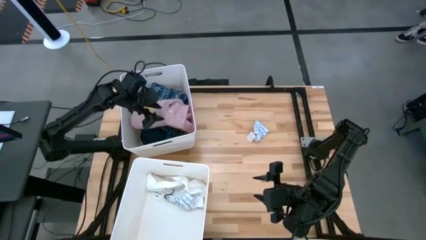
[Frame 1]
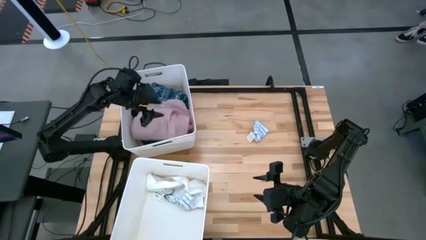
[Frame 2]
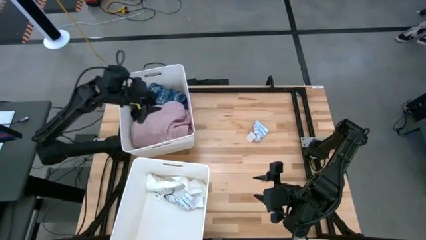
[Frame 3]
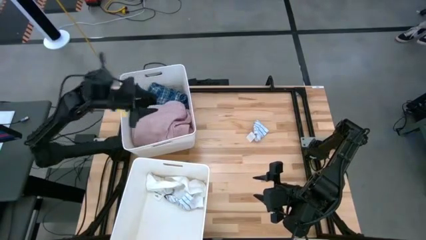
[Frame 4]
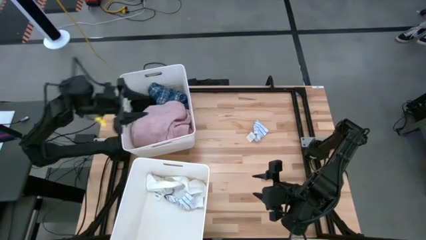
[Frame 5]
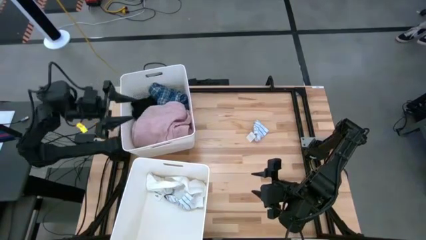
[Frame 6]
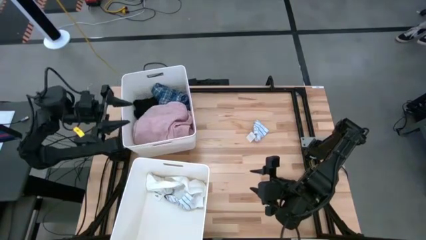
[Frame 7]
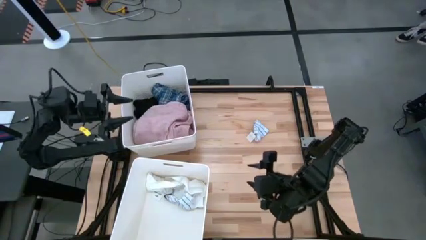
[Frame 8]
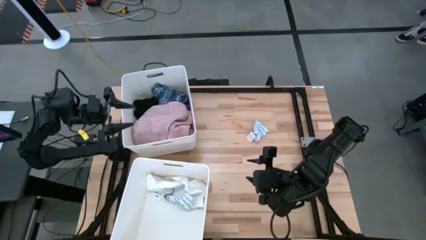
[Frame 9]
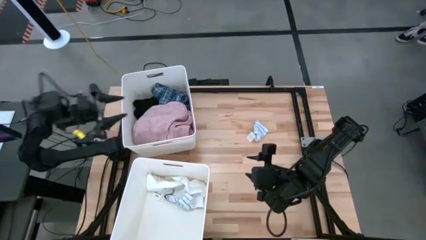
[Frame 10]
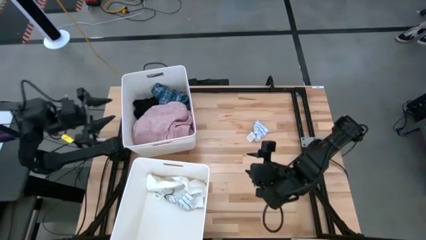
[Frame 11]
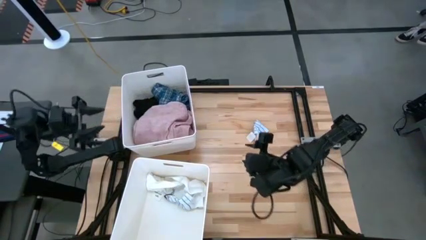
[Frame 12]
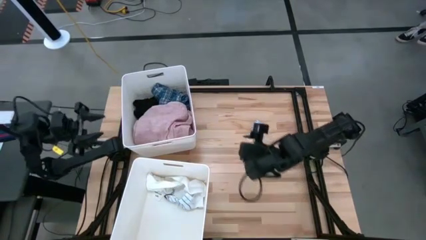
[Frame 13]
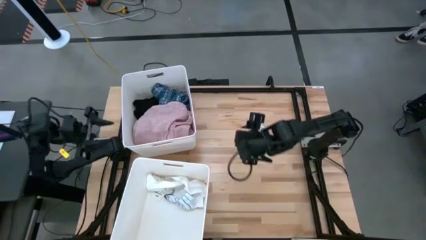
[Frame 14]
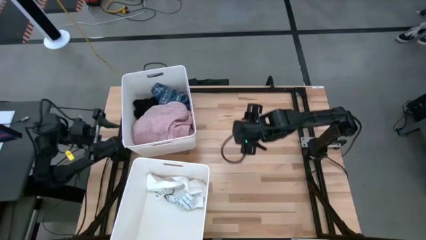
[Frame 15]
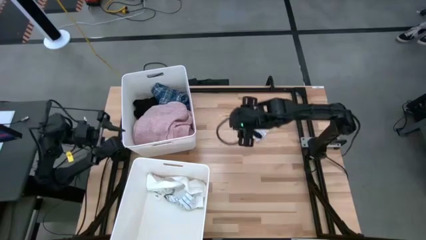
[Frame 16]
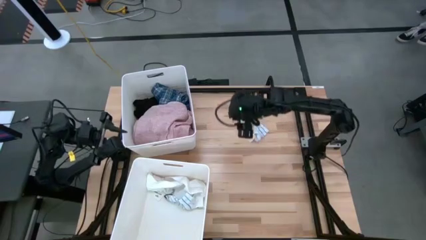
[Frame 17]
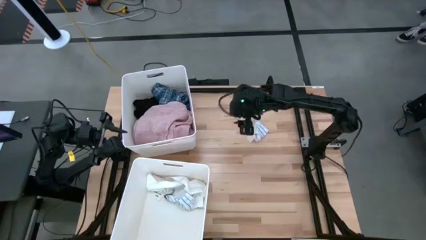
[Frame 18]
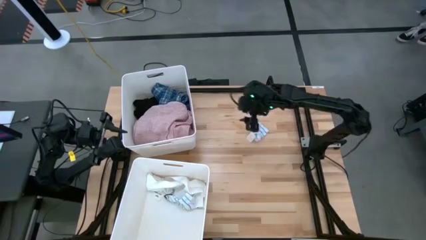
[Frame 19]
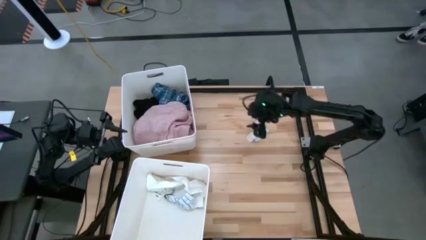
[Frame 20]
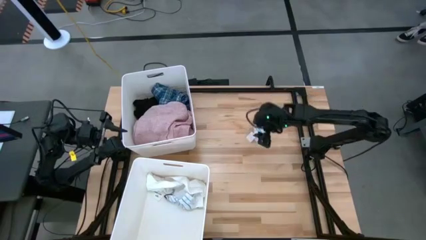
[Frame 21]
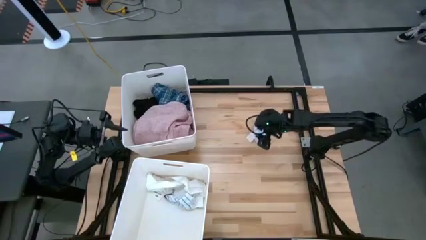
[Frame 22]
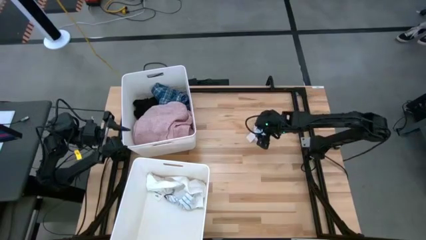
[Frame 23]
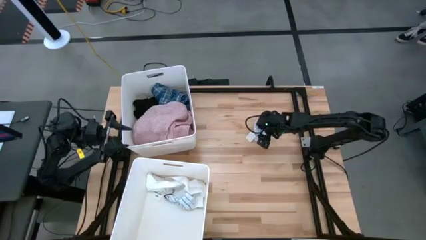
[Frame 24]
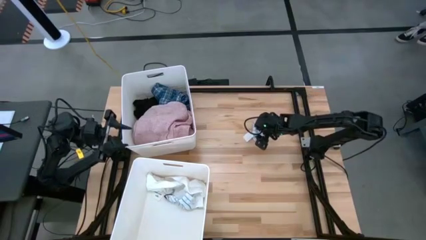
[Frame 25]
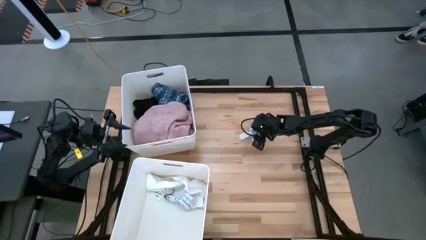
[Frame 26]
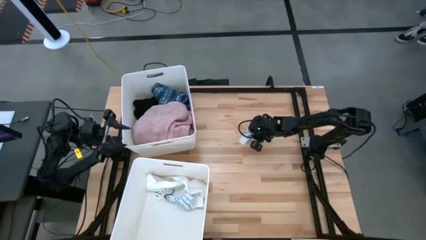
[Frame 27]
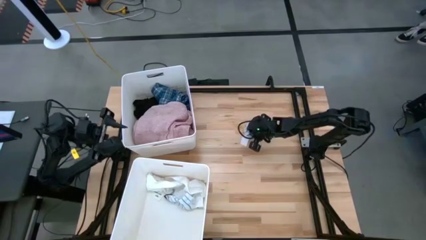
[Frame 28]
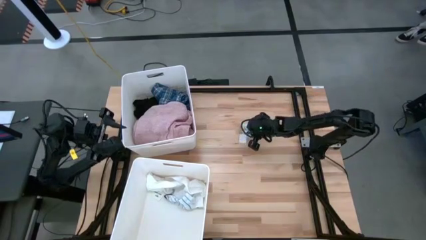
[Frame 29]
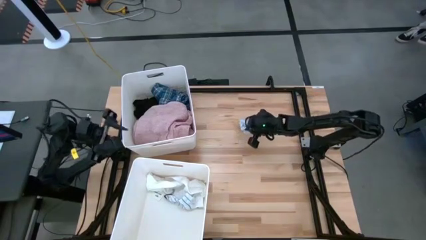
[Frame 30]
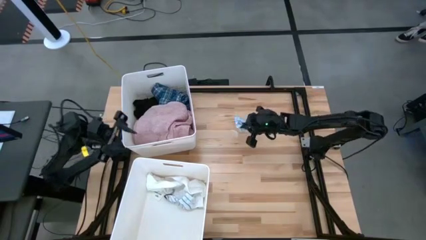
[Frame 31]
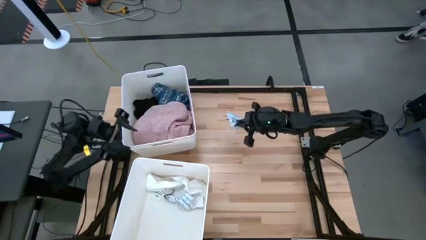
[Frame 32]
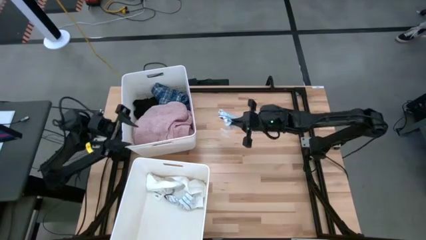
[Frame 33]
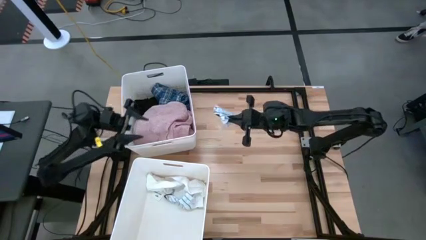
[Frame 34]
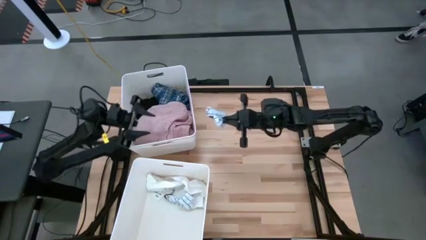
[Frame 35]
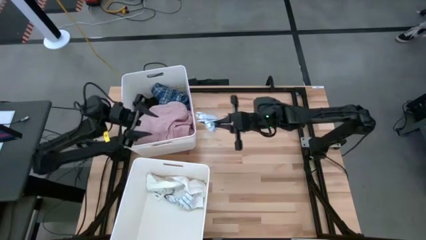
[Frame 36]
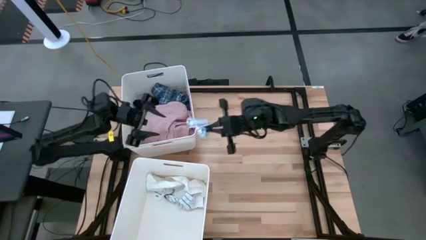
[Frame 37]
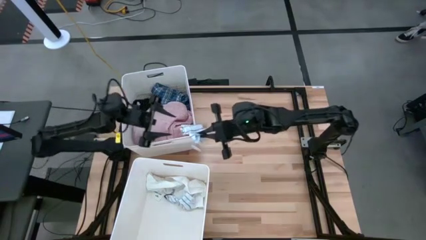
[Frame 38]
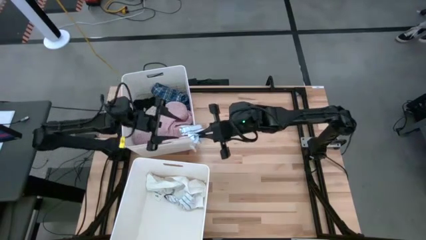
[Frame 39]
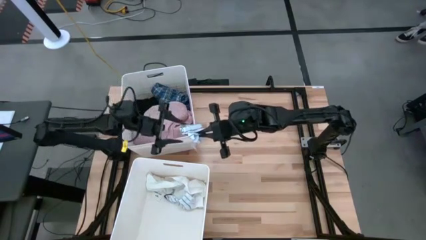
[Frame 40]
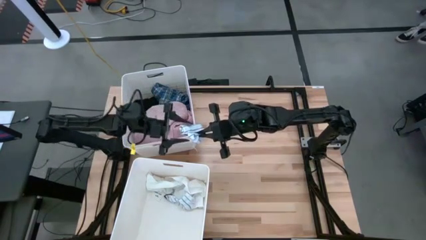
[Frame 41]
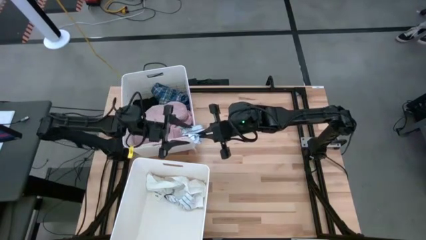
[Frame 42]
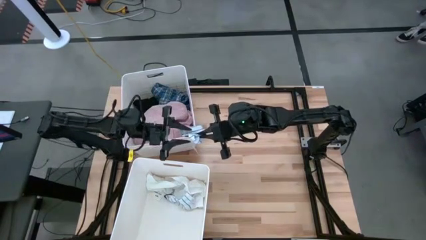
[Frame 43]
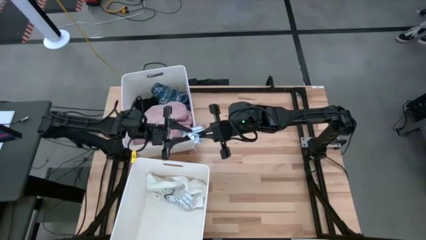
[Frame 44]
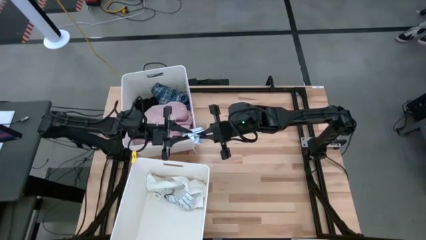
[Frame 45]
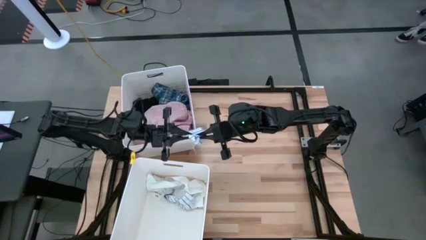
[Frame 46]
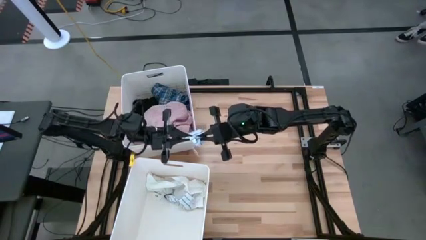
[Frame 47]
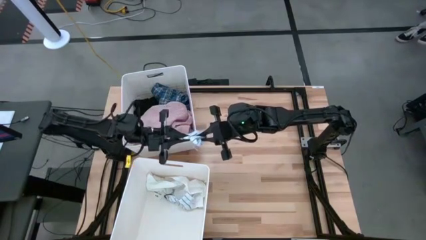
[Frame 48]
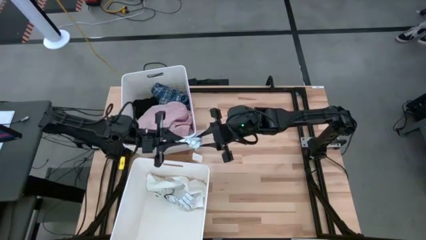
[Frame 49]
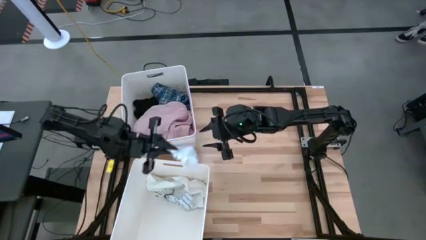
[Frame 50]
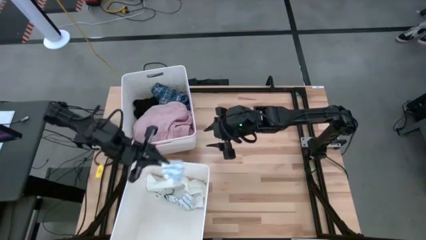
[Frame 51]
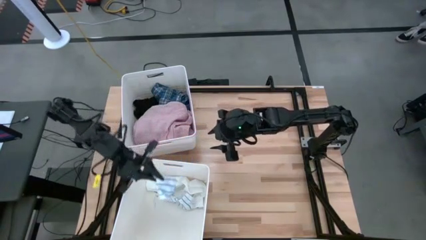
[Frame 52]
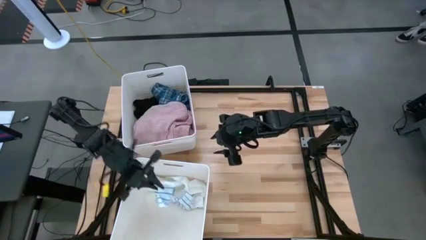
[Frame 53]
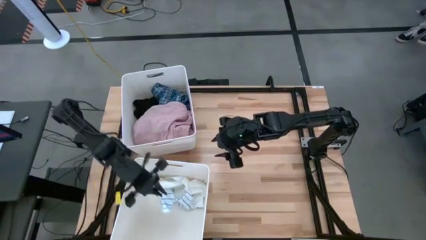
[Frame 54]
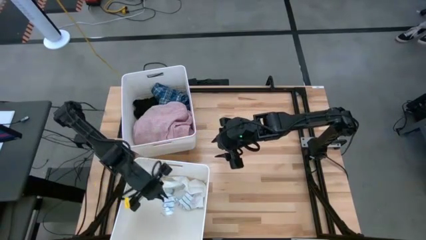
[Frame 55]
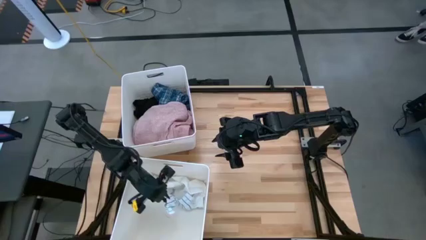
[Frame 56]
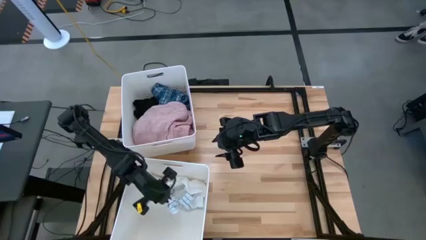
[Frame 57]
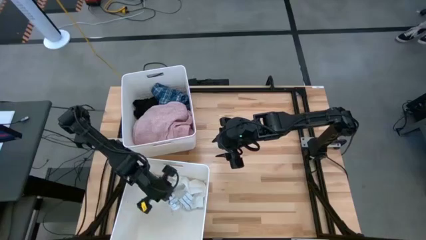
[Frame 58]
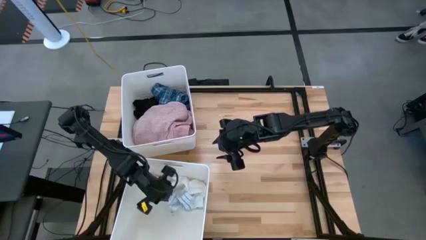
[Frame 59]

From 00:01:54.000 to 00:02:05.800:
Task: Sort clothes
Put the white striped sock into the bottom white laundry organizer

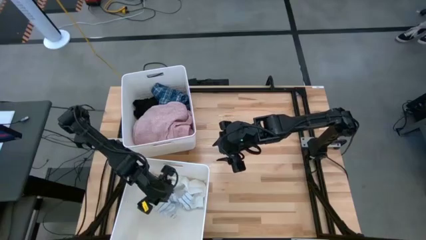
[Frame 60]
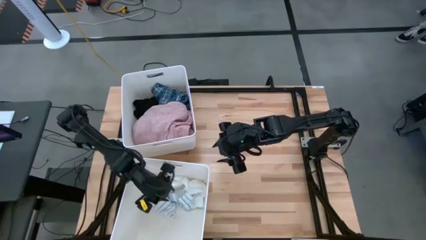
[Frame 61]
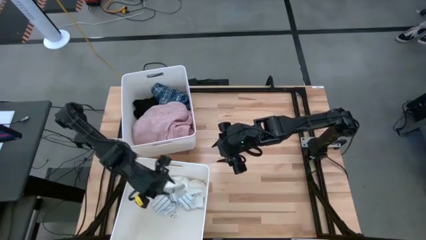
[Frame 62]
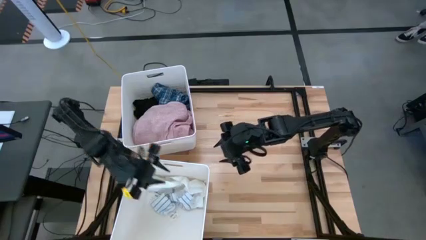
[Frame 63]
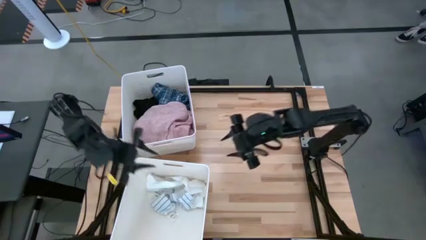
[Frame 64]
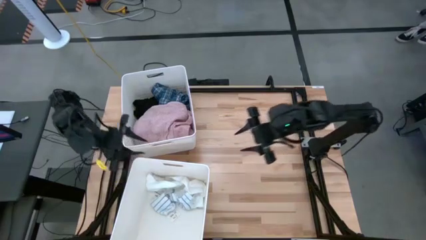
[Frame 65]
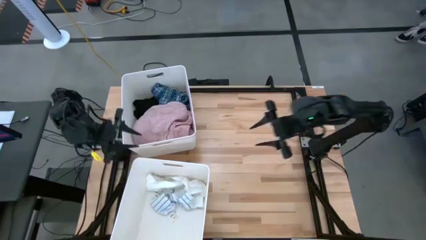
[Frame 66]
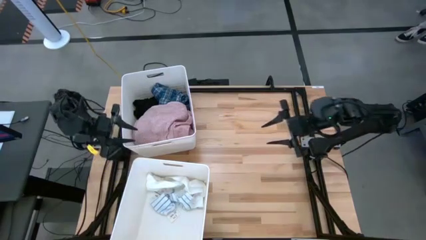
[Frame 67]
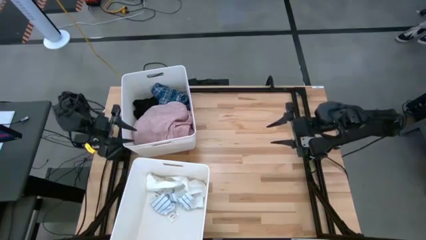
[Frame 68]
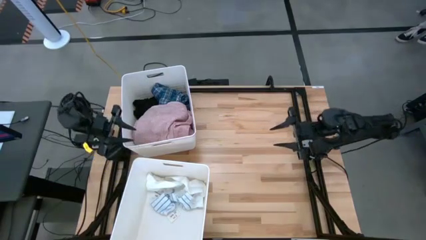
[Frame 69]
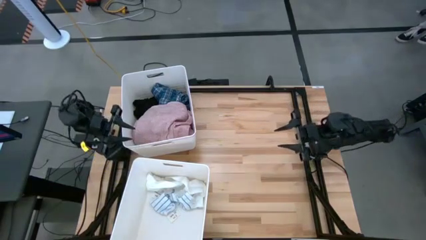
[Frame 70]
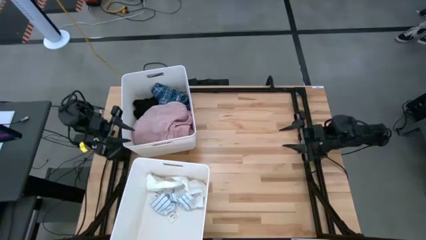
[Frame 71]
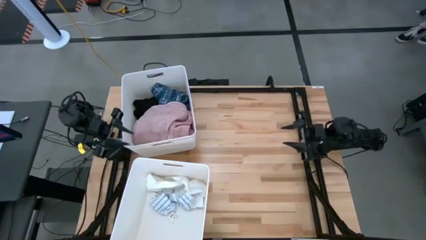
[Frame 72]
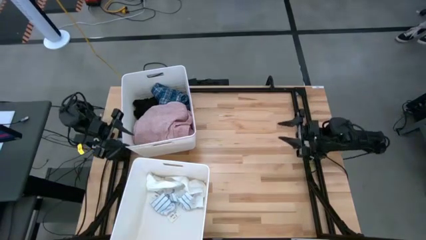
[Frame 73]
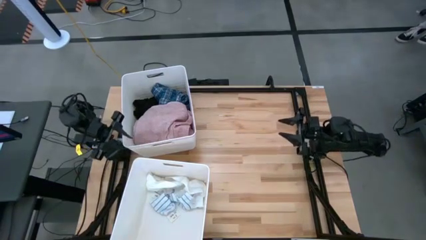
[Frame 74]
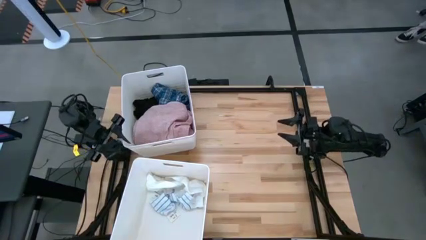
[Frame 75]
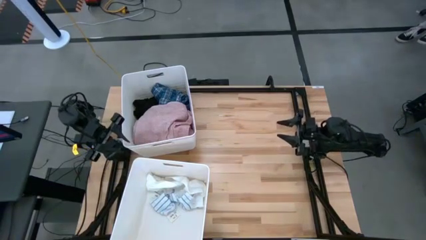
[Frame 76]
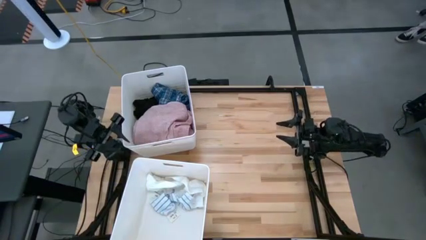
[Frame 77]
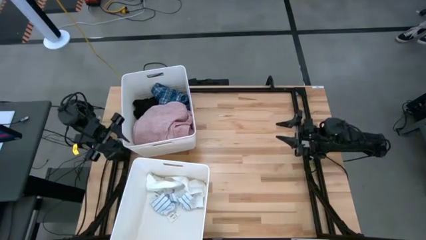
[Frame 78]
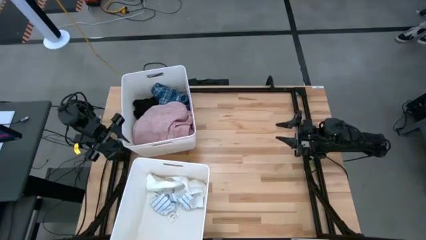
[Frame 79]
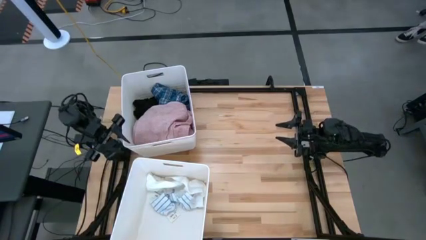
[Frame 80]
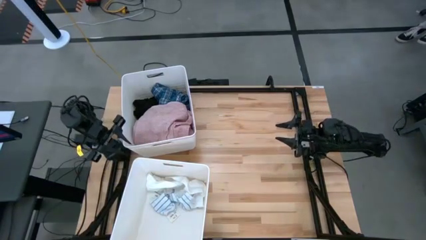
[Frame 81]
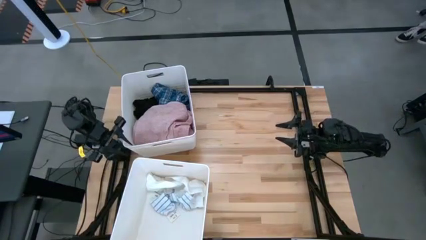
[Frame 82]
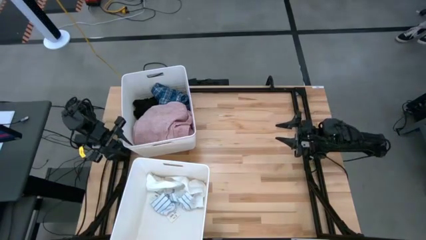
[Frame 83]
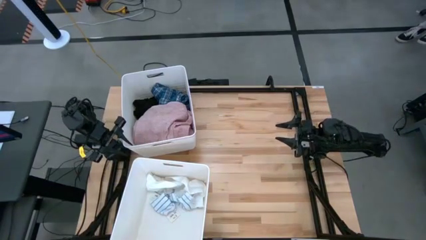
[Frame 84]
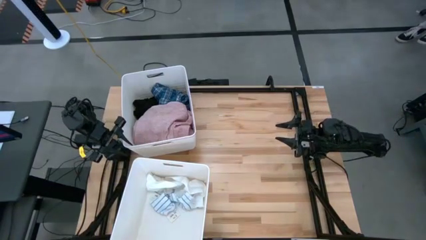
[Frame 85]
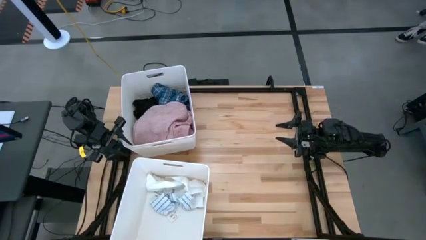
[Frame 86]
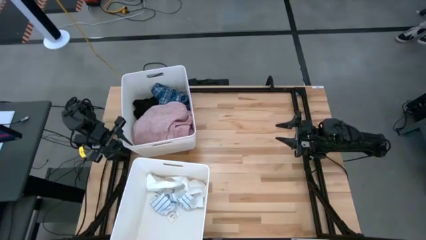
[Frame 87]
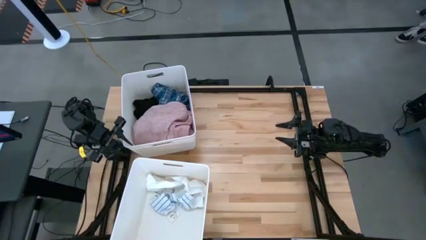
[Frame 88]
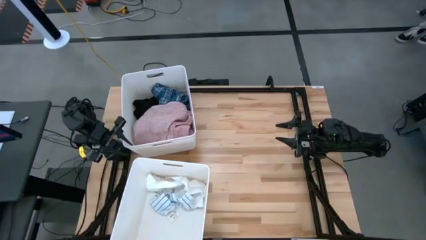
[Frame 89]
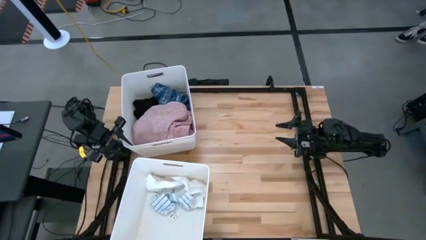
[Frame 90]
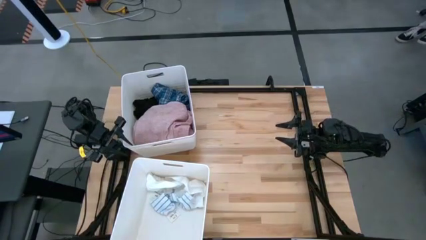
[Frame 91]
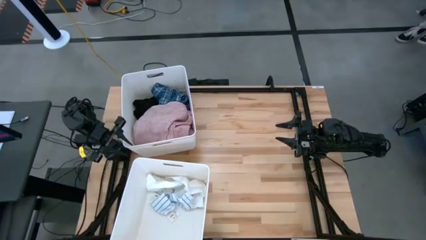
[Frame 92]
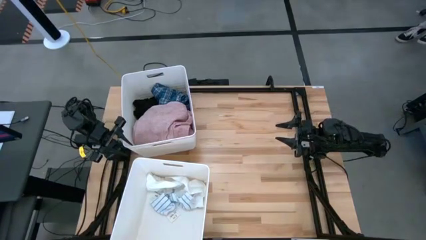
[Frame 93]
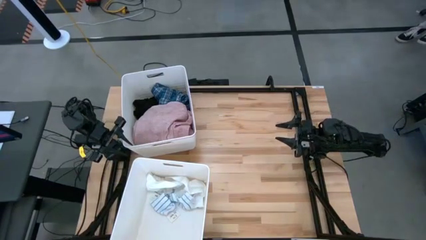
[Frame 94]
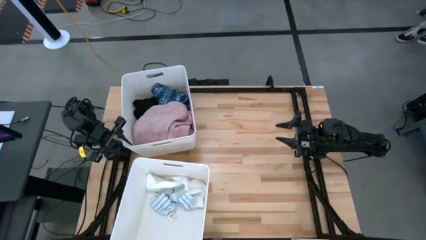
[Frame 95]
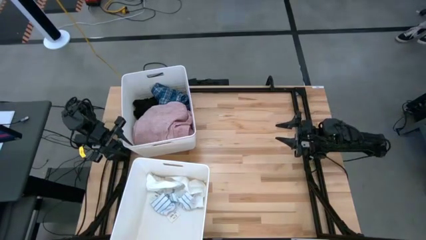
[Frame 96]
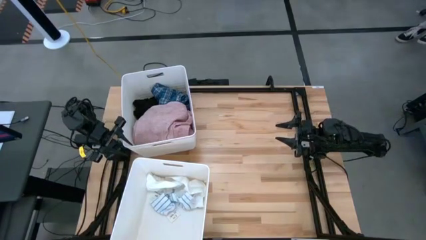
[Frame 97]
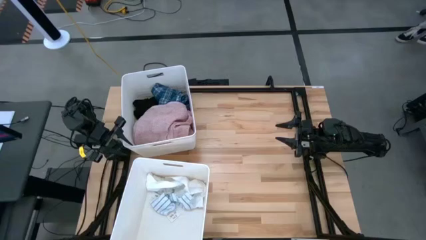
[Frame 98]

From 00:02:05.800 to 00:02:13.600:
Return to Home Position
